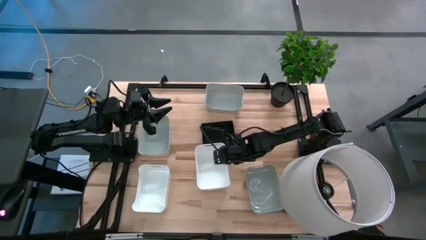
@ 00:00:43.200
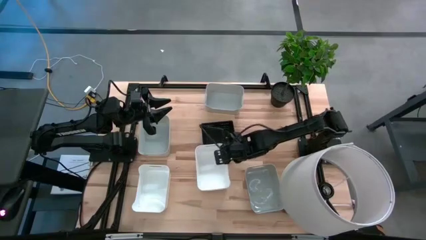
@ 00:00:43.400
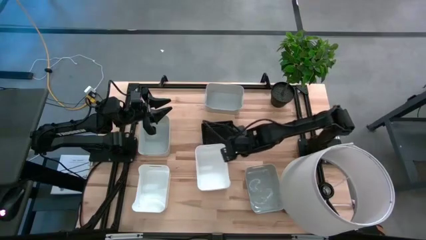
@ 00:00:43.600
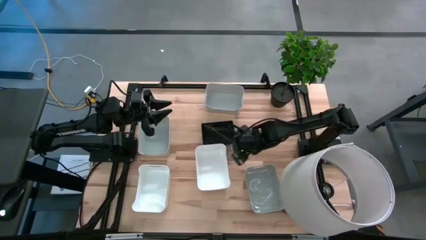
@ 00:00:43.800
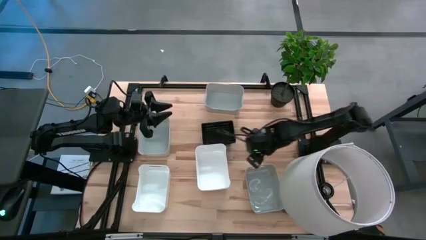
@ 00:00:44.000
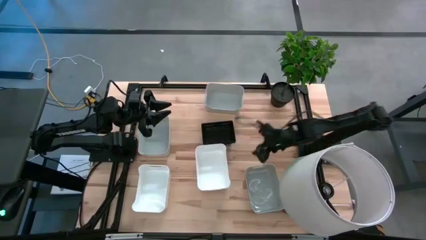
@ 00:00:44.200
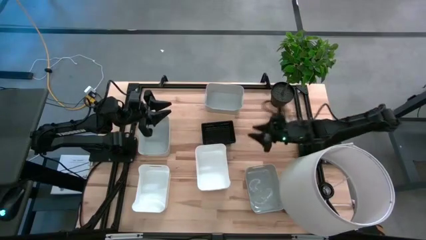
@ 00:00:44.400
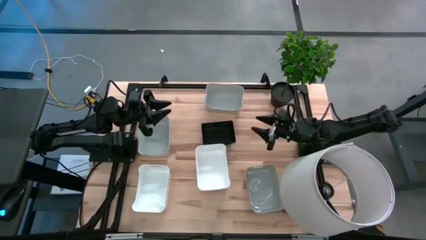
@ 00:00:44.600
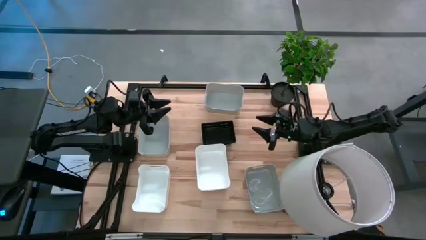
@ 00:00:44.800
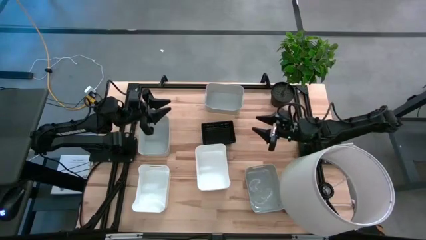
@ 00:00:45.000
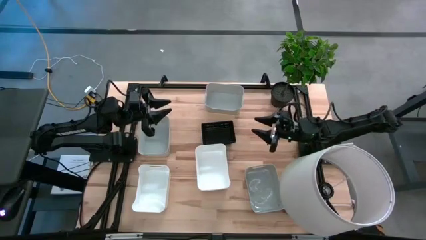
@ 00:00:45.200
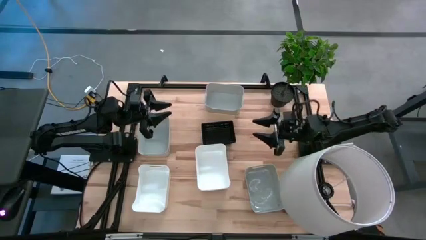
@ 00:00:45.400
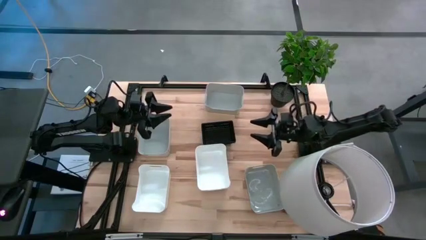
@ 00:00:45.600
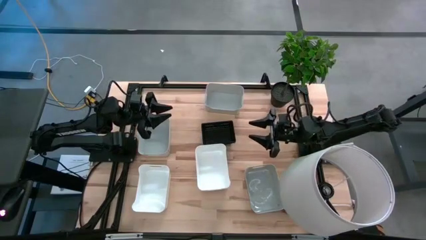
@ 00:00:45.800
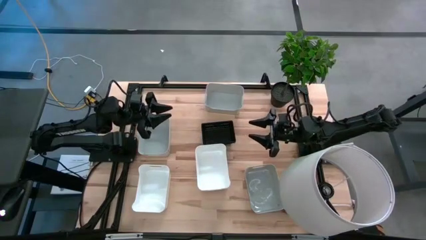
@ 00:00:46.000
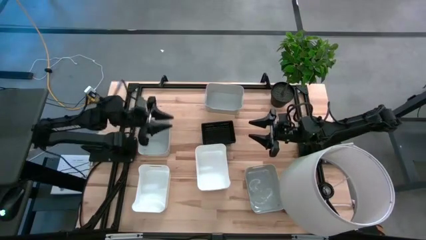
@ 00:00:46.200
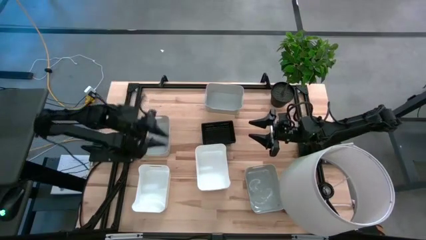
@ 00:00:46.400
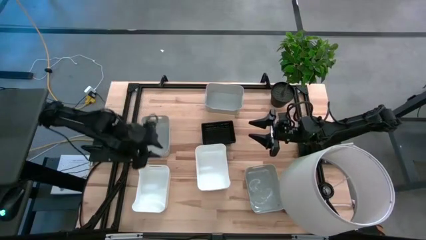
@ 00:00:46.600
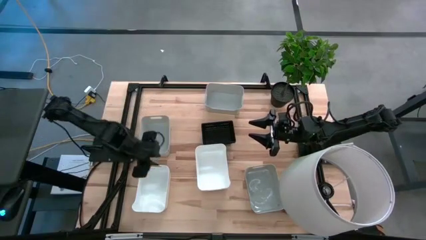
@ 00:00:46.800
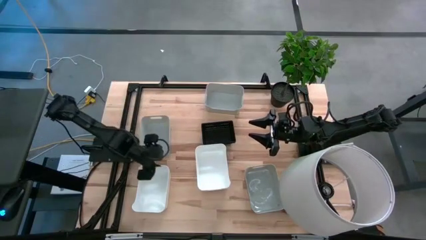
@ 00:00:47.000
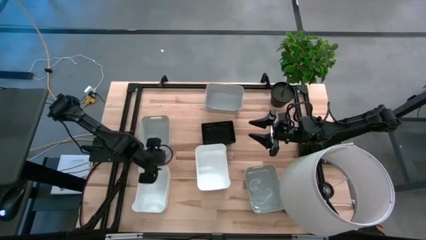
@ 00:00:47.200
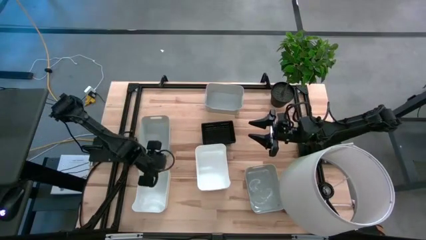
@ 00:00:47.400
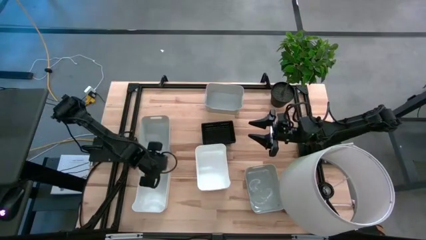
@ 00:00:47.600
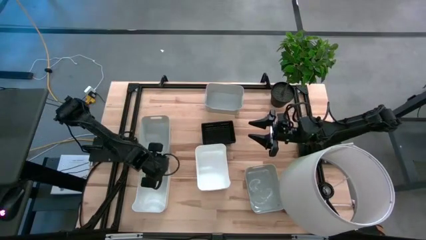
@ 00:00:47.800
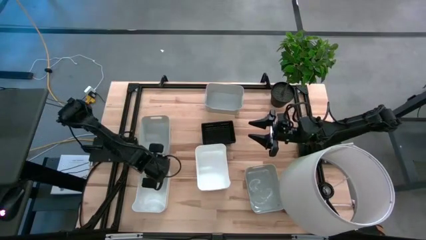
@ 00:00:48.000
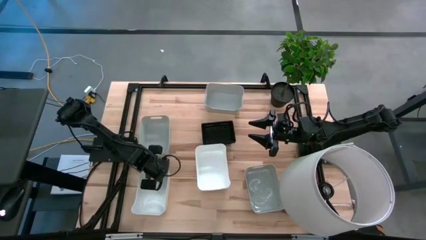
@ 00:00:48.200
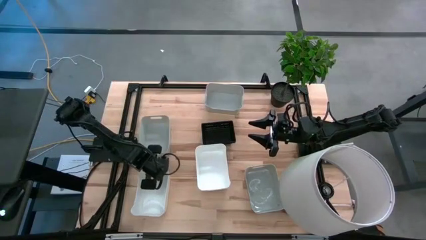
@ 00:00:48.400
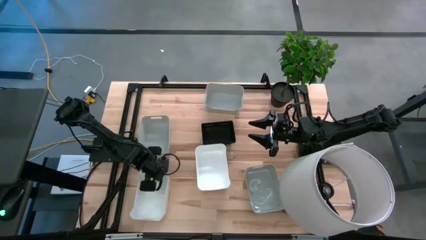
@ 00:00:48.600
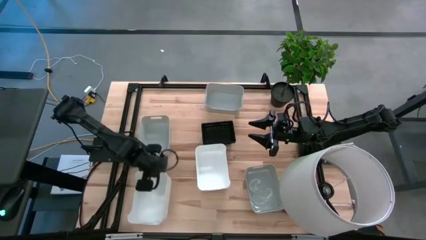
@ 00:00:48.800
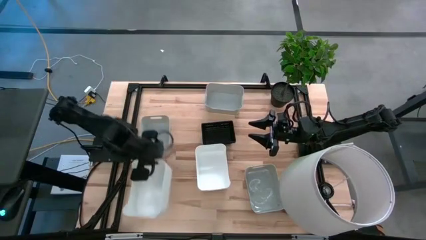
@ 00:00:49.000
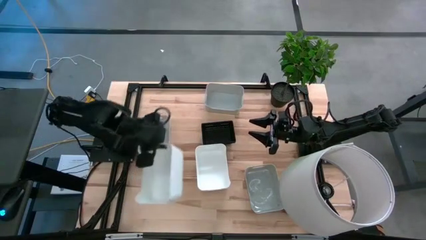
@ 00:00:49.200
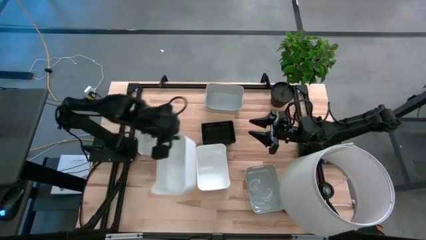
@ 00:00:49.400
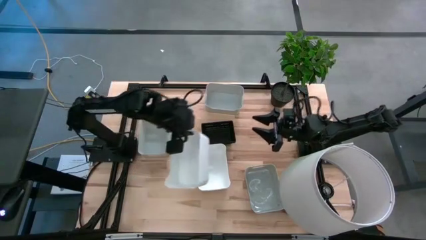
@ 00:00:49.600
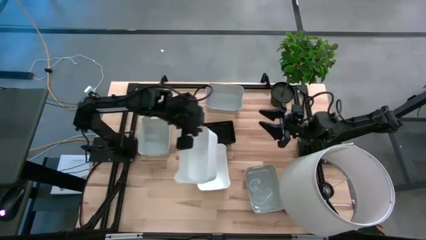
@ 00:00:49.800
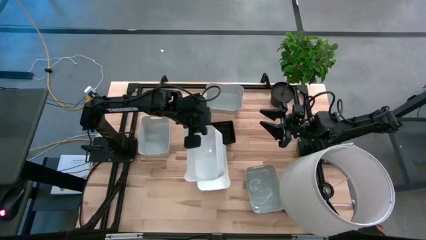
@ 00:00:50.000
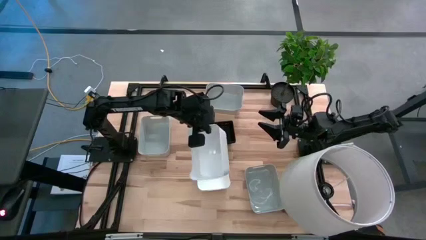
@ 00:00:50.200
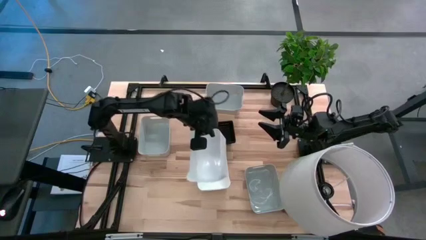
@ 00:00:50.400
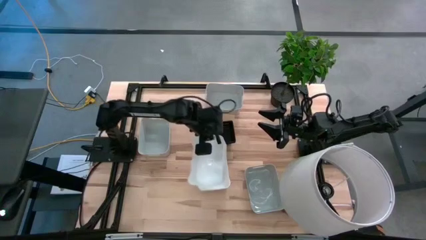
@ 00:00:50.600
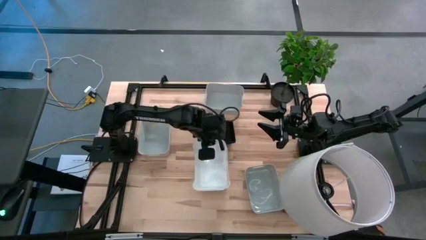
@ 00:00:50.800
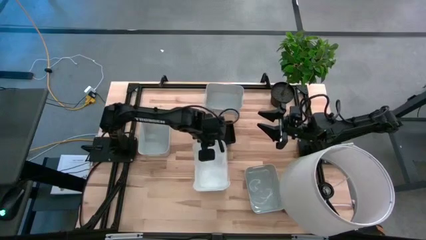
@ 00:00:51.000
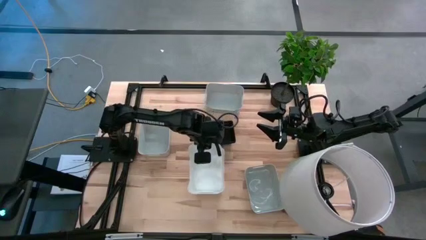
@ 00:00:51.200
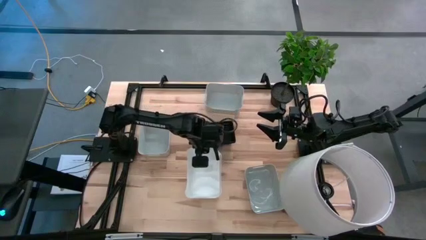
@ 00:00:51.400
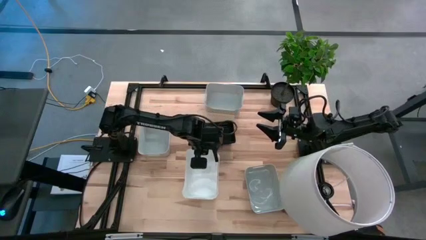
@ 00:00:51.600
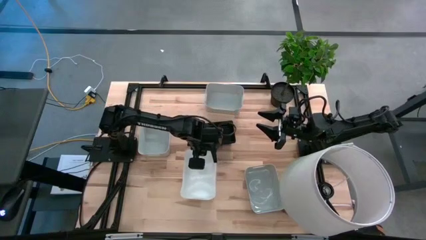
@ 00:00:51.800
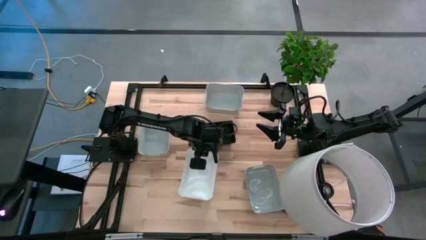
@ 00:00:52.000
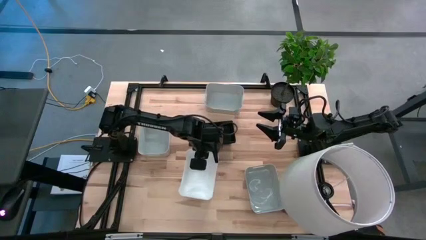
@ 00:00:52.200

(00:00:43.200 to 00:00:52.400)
Stack the left white bin on top of the white bin

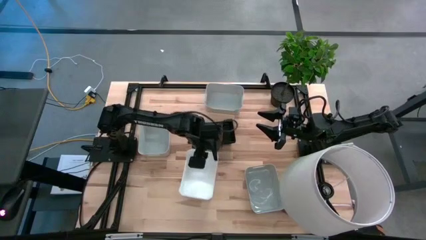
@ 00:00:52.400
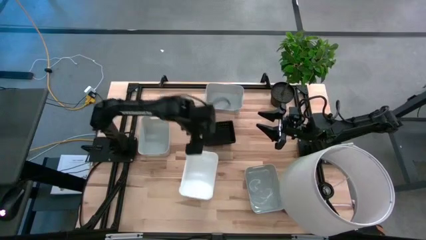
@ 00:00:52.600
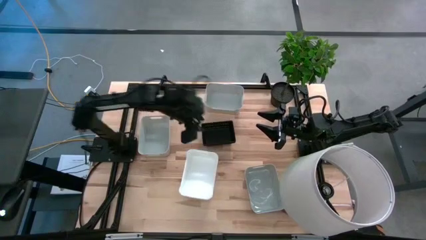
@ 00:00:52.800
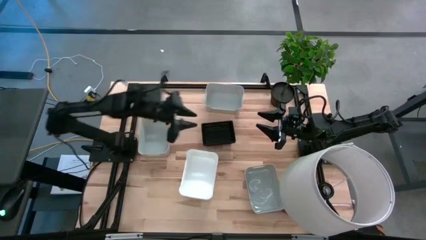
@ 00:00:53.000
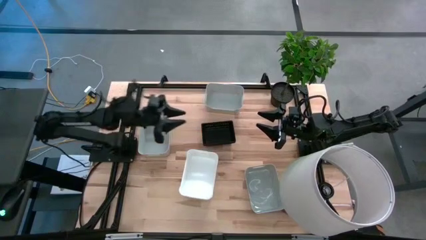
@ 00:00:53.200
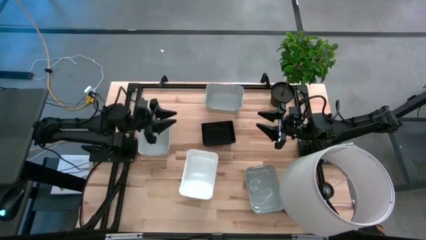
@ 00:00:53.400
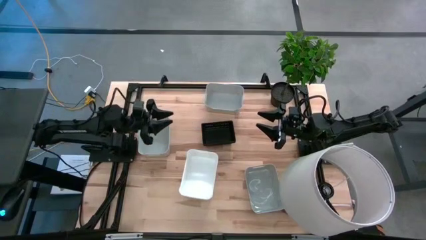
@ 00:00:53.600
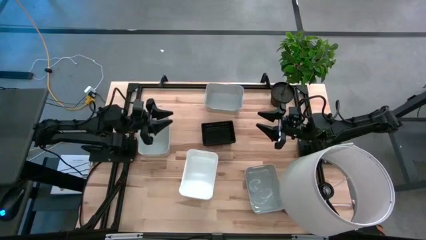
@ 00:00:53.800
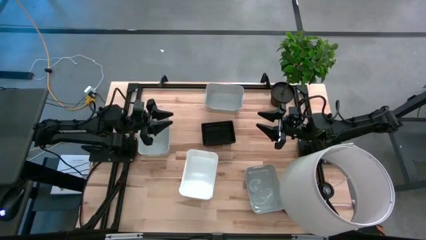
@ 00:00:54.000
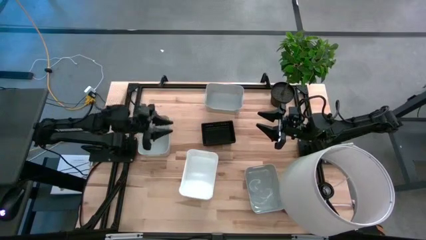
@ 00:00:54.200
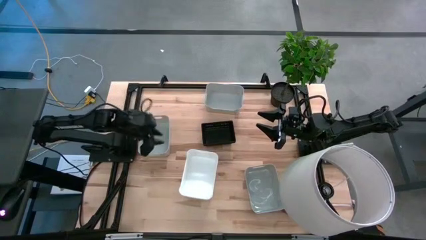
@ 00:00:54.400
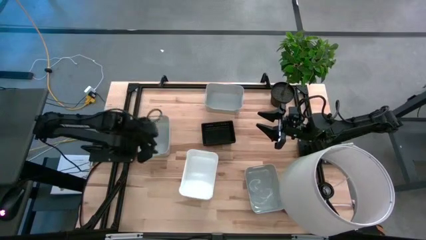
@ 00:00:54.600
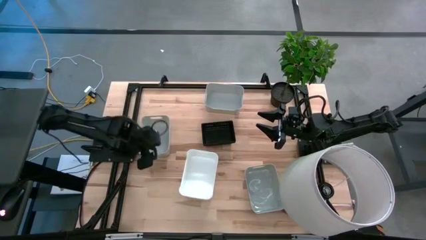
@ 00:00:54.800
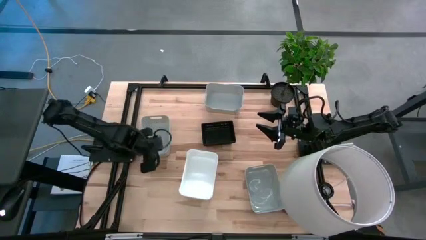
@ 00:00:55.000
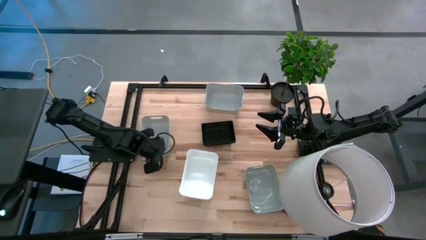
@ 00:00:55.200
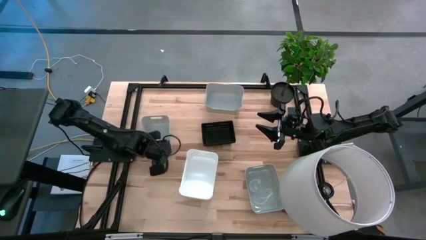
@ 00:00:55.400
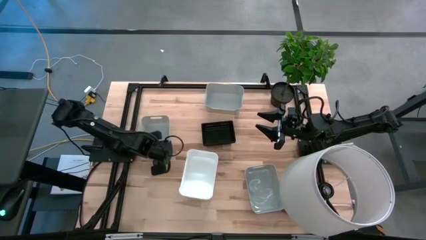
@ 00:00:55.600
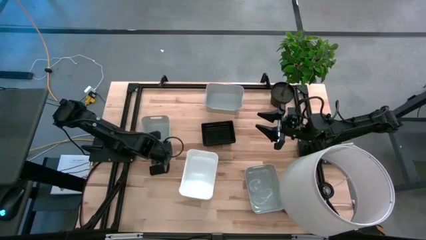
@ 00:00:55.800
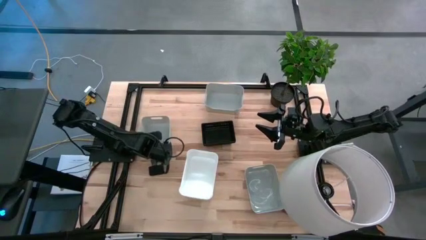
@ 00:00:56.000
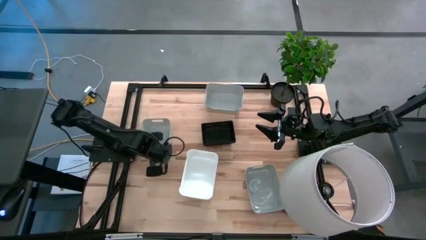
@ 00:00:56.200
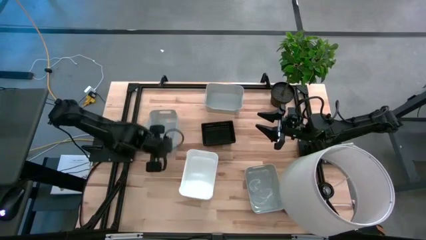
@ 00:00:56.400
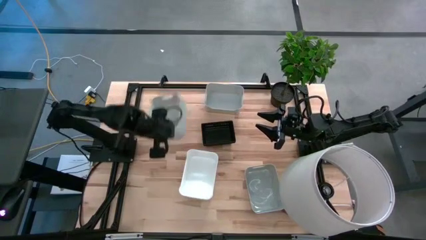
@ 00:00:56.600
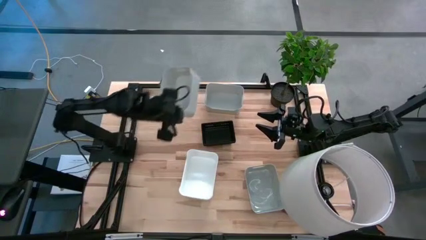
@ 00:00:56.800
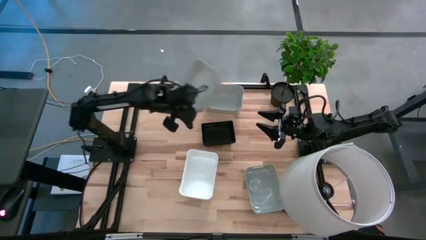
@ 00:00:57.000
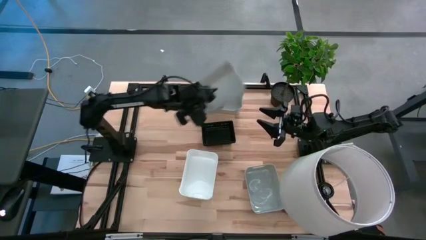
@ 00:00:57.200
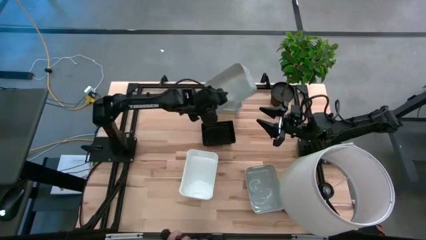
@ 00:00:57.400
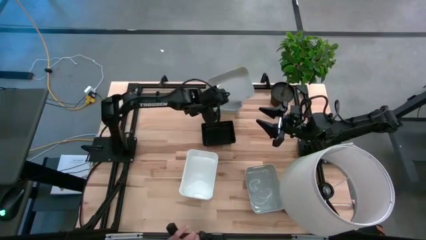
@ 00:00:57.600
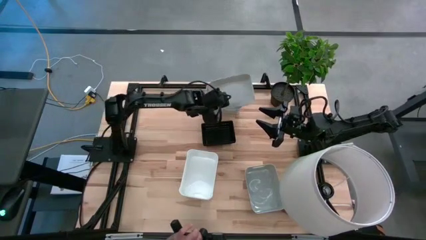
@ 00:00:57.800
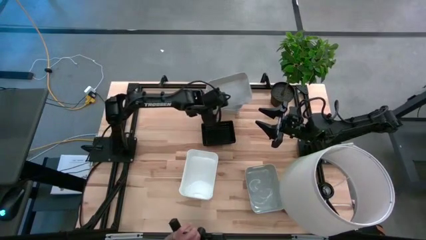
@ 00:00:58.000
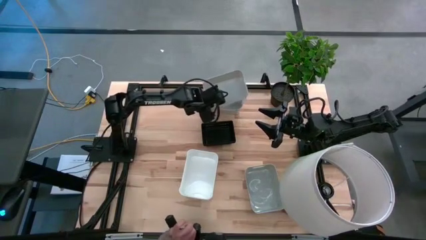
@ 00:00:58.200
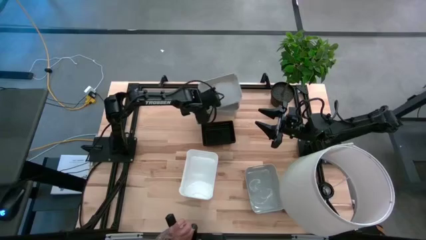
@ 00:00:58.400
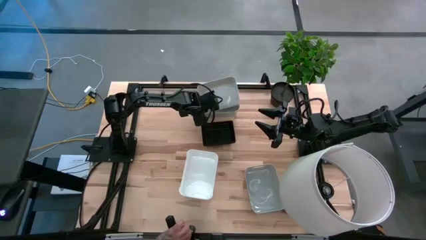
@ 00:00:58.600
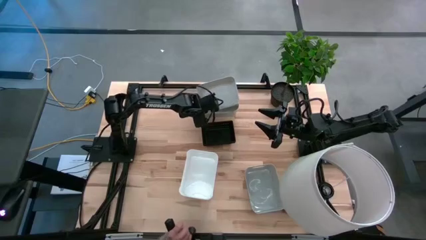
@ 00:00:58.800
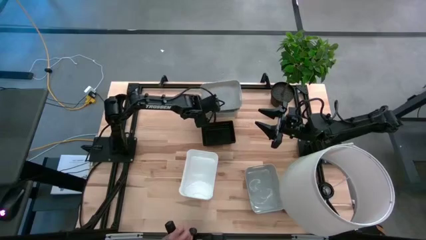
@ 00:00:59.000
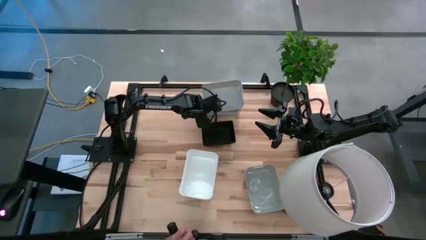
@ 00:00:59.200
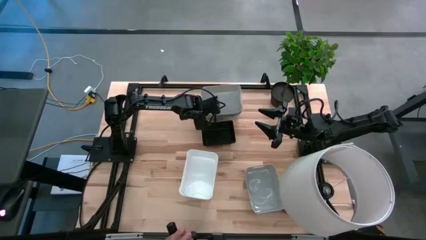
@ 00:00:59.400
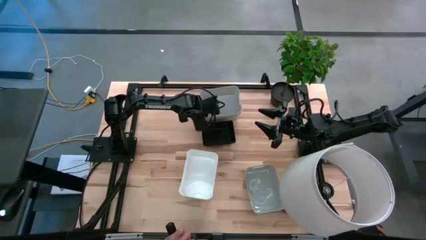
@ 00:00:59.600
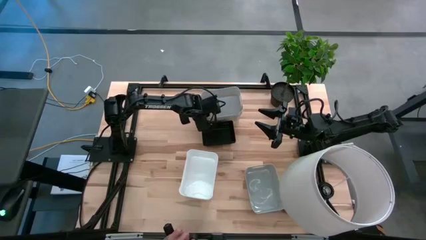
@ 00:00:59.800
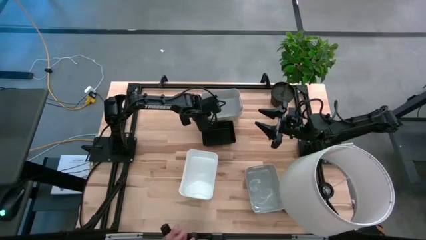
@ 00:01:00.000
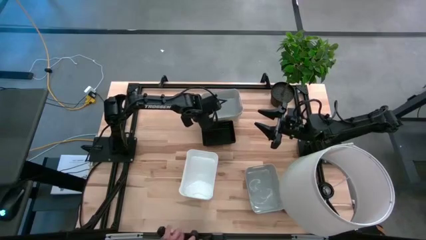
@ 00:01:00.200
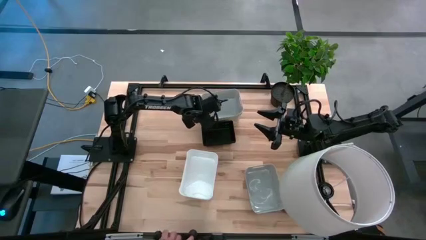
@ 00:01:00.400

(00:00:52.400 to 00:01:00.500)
Stack the middle gray bin on top of the top gray bin
